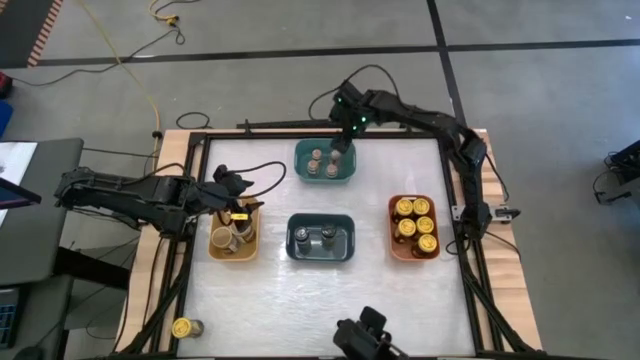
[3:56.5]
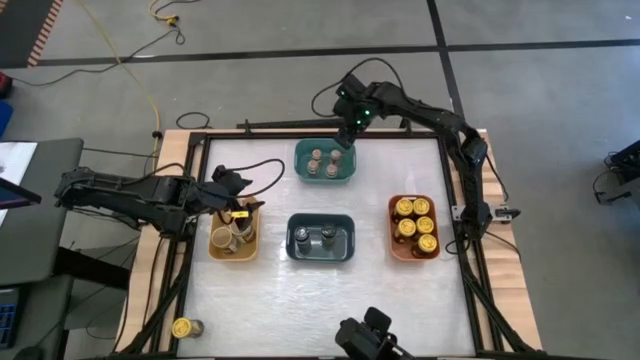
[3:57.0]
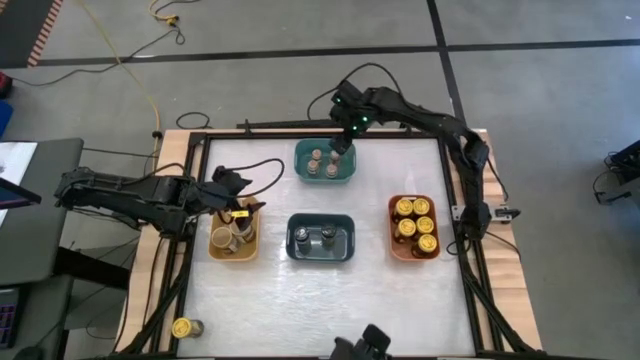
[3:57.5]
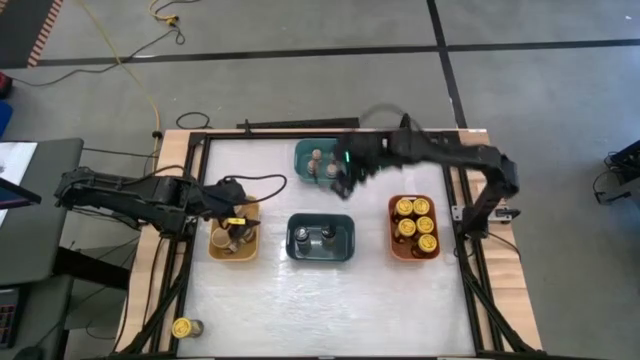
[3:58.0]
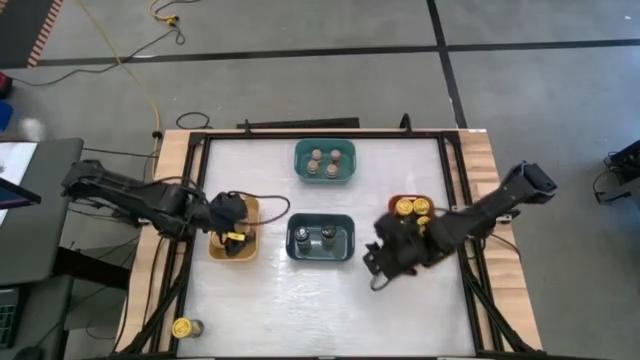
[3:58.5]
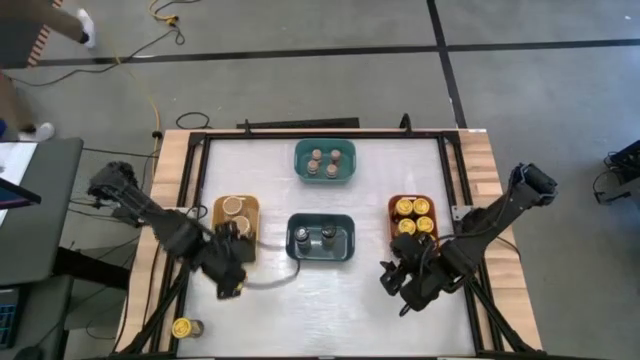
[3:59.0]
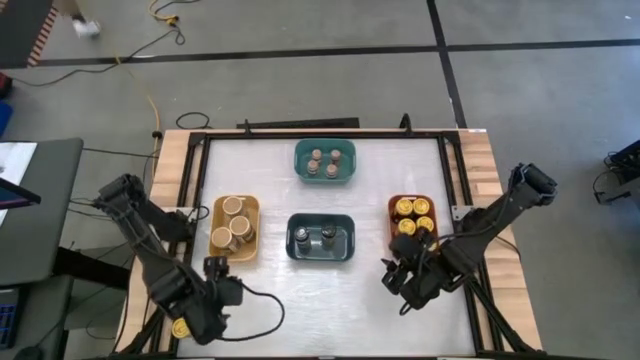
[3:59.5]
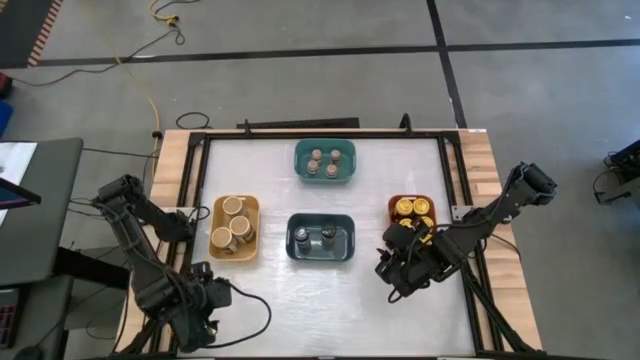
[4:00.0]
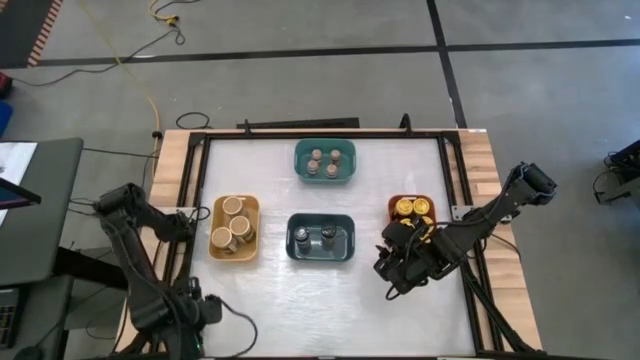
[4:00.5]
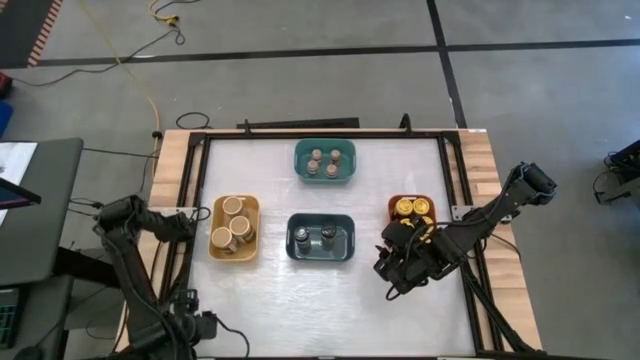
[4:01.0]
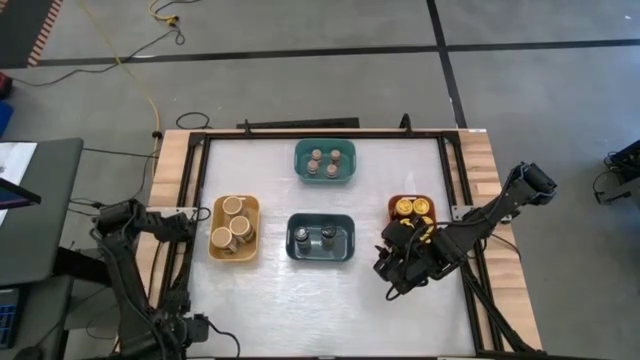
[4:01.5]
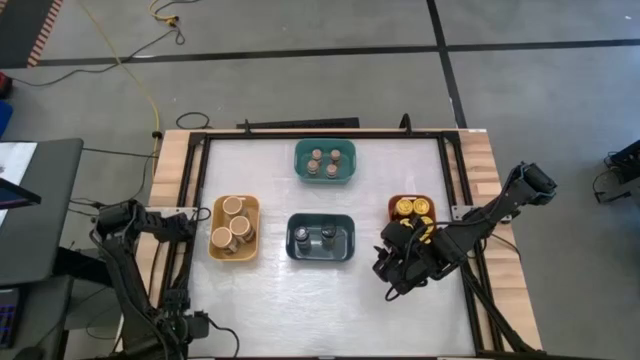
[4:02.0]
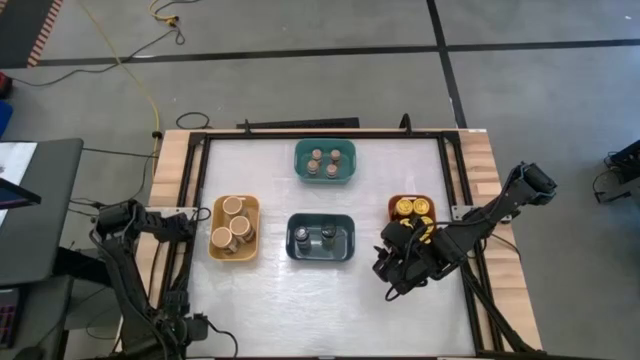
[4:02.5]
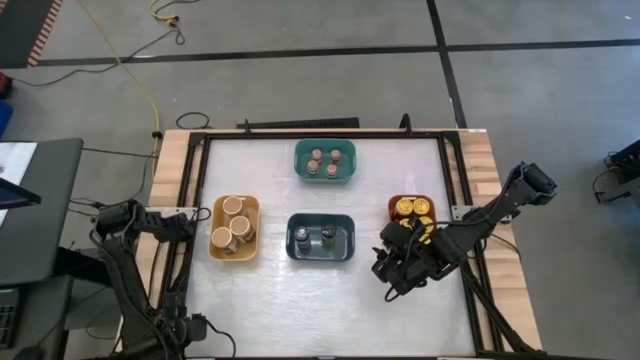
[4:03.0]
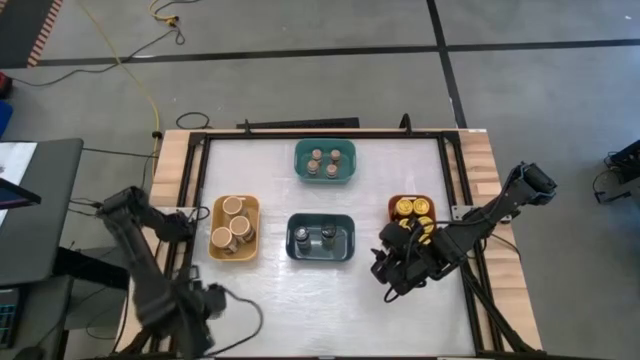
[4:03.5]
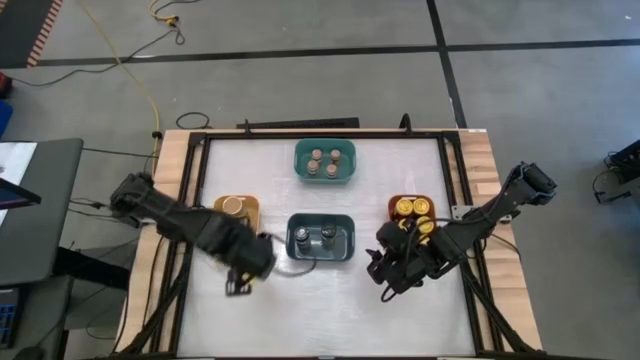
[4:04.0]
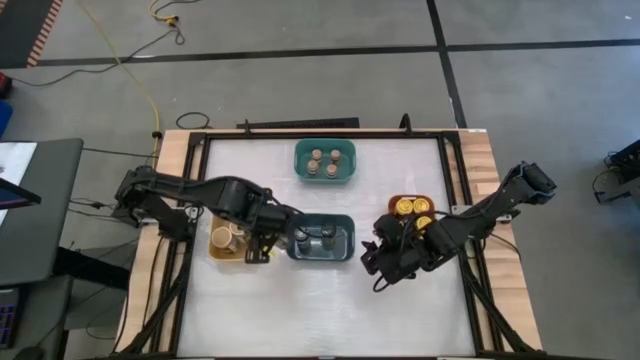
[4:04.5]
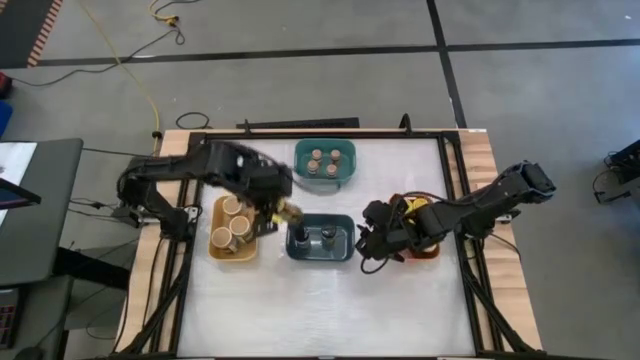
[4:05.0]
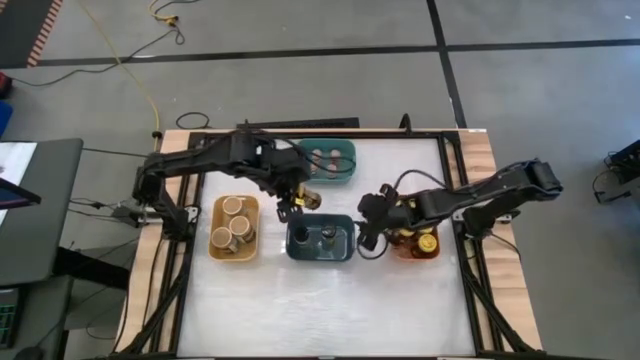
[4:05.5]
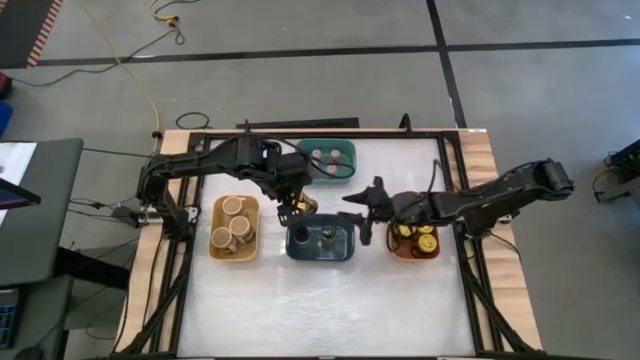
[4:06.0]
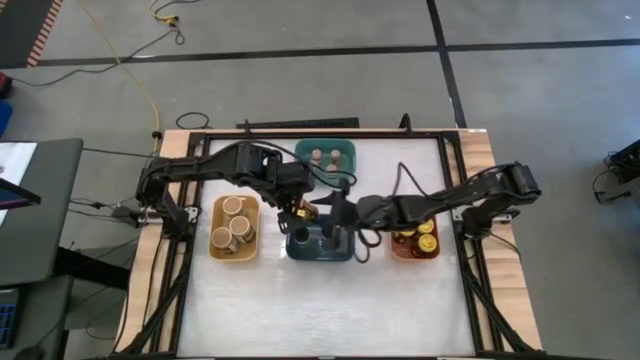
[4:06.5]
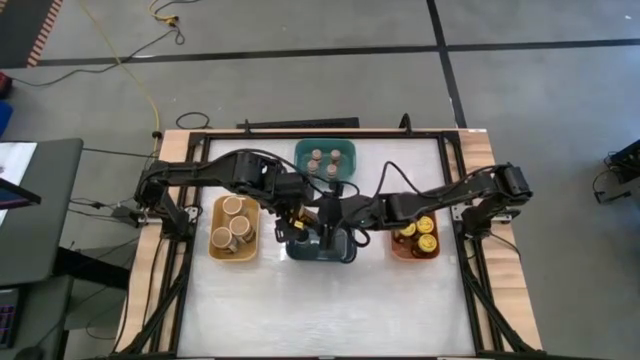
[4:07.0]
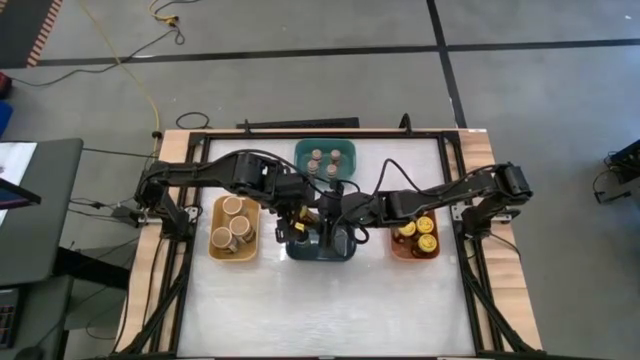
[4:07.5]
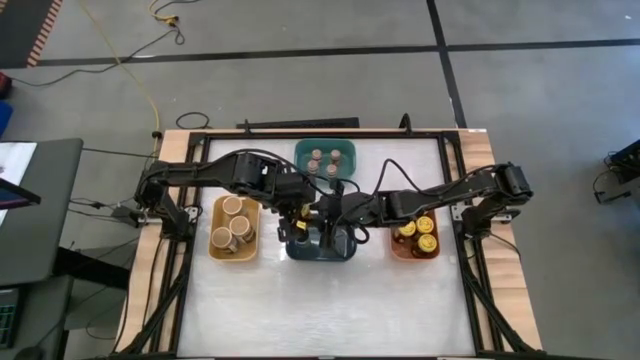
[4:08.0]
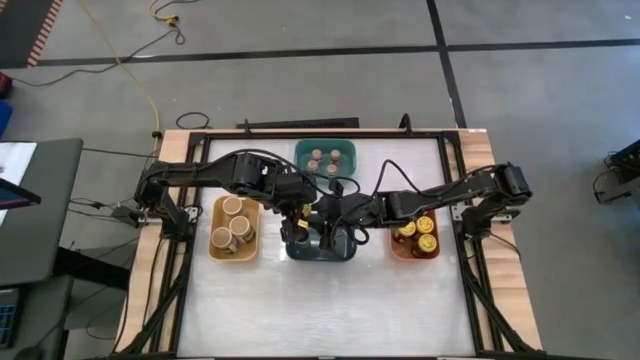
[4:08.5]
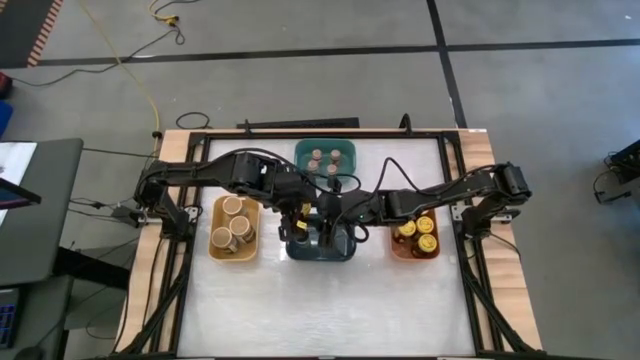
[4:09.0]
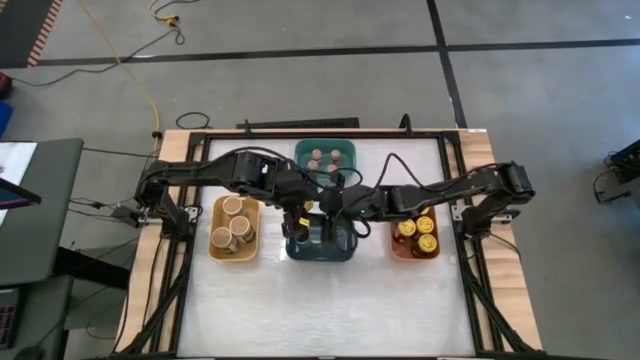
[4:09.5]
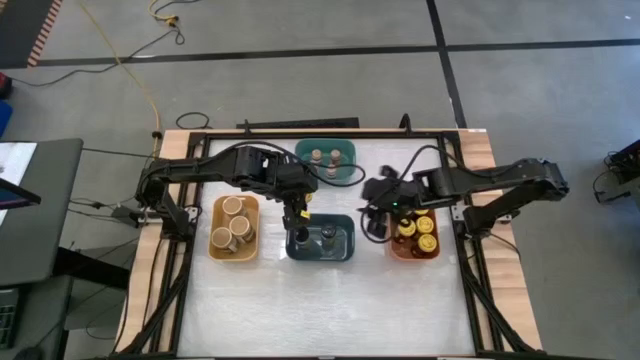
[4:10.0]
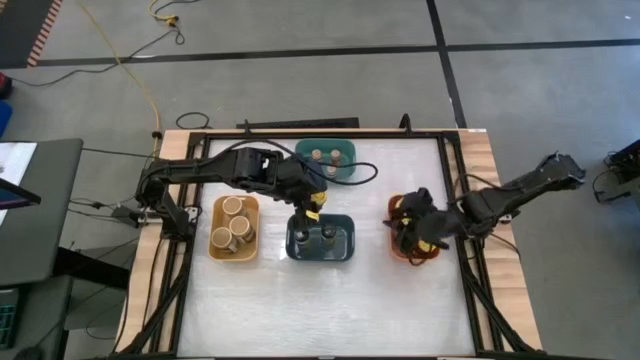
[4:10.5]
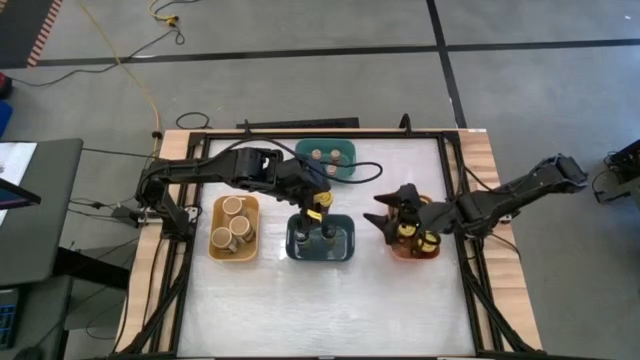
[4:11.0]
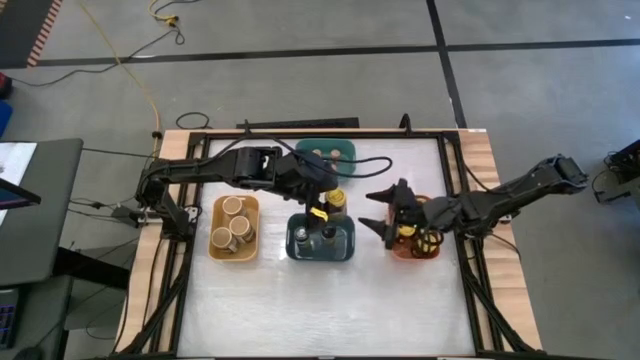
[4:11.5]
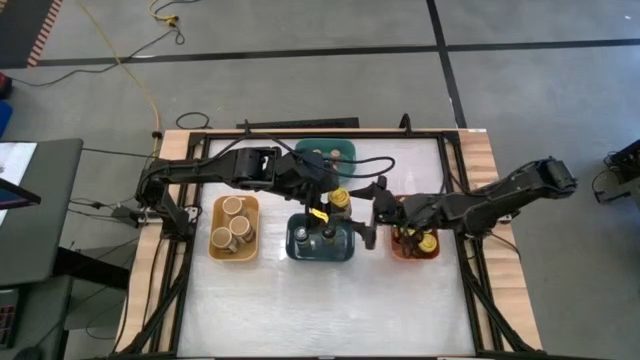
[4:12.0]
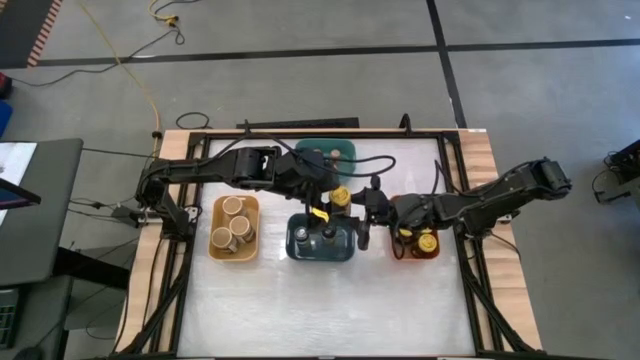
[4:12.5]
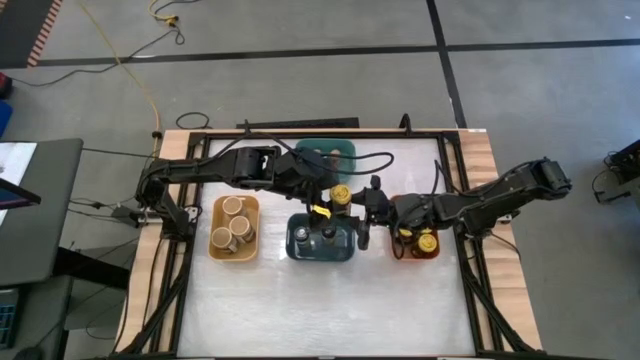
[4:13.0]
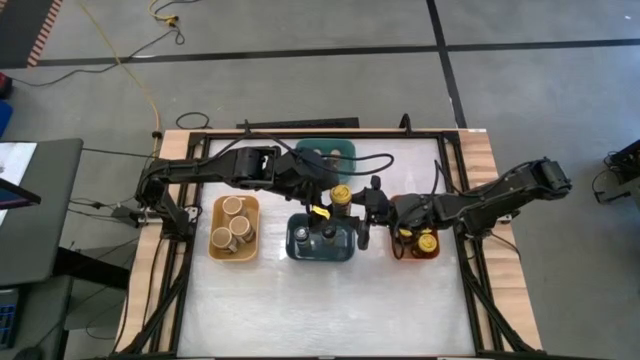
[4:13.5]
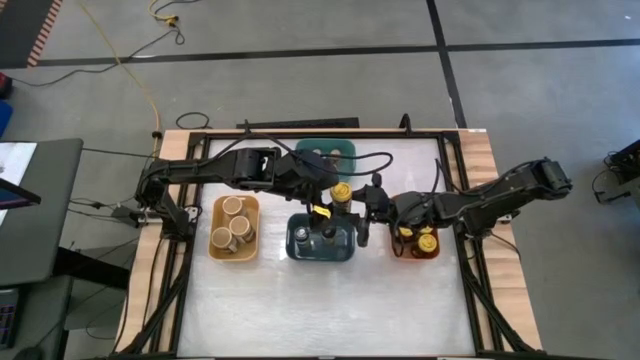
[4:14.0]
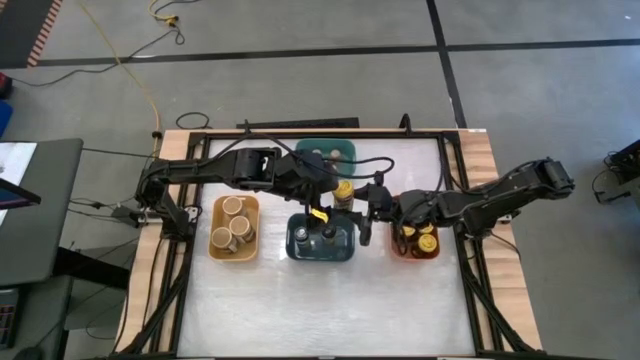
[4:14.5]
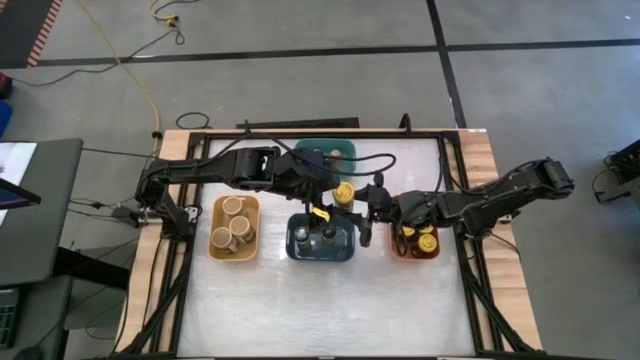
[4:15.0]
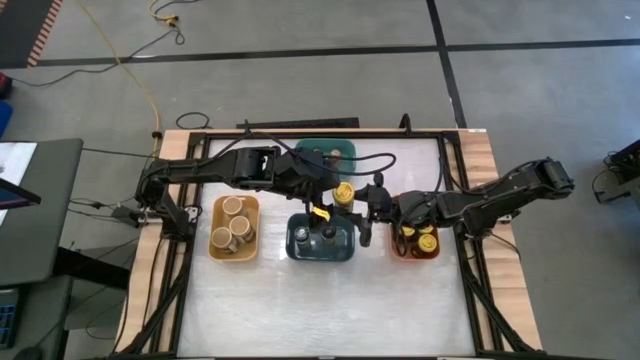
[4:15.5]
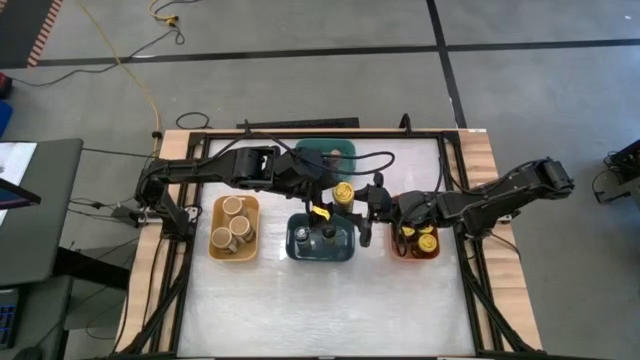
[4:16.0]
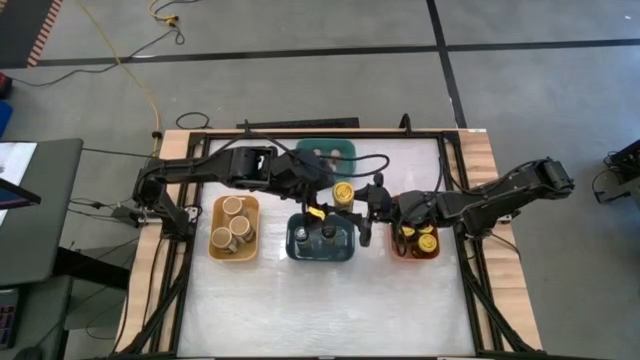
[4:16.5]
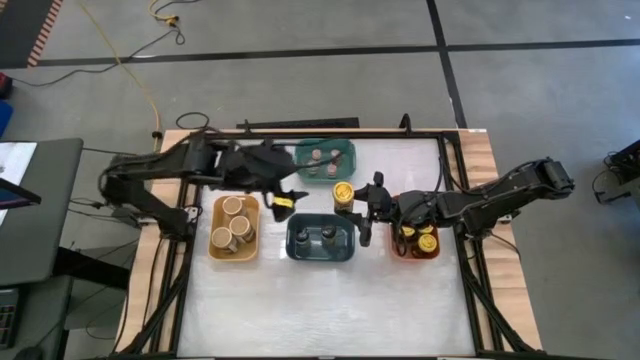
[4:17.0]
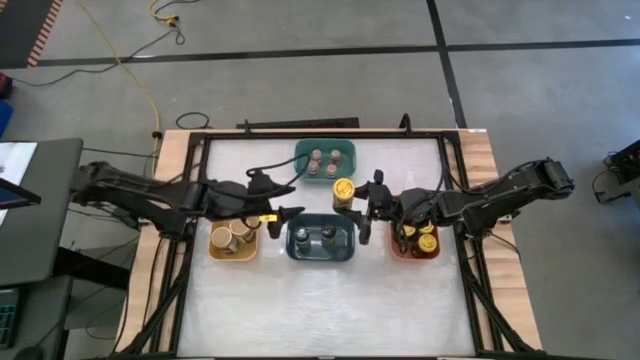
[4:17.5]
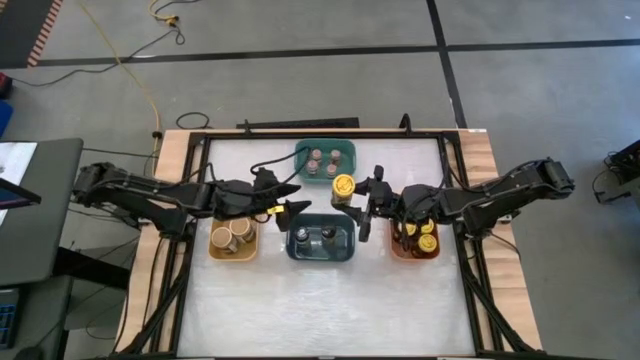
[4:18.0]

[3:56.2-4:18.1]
Task: Sort spices by type
Put the yellow seasoning into the orange bin
